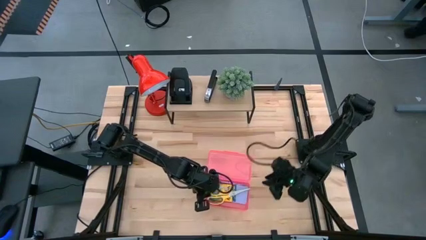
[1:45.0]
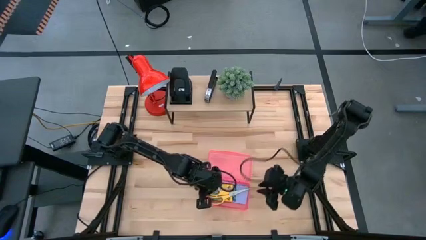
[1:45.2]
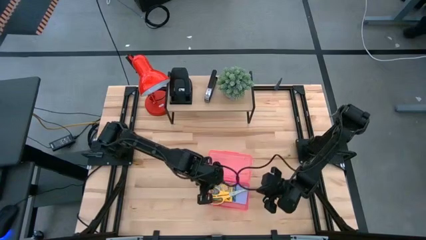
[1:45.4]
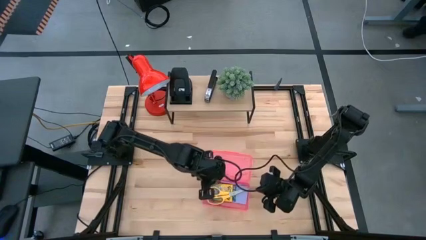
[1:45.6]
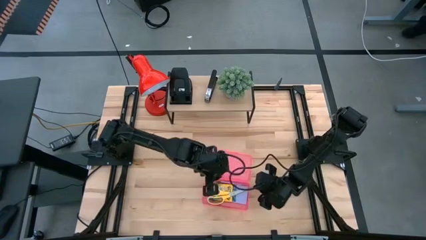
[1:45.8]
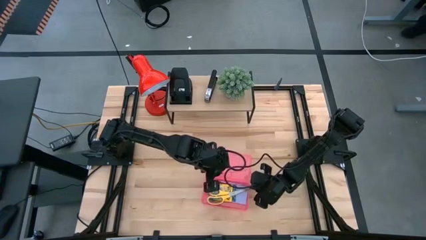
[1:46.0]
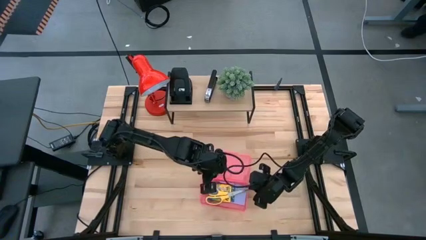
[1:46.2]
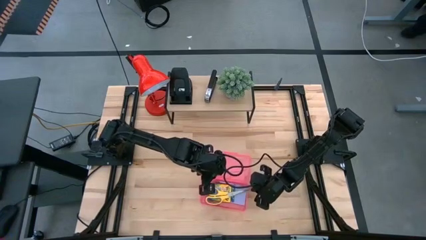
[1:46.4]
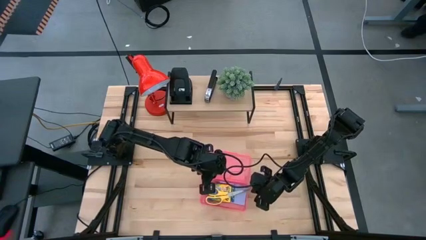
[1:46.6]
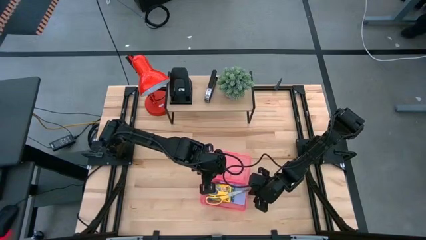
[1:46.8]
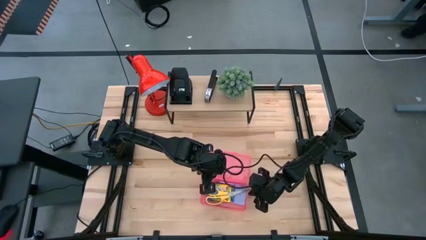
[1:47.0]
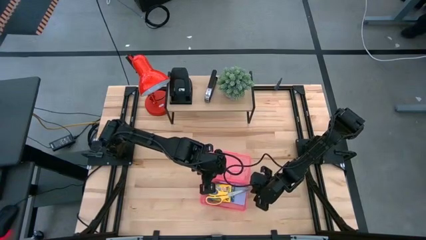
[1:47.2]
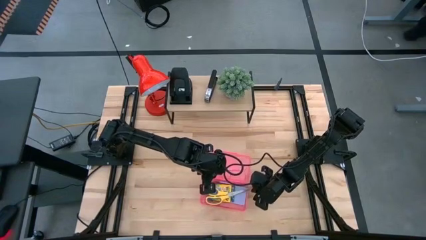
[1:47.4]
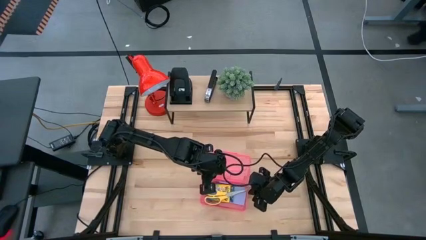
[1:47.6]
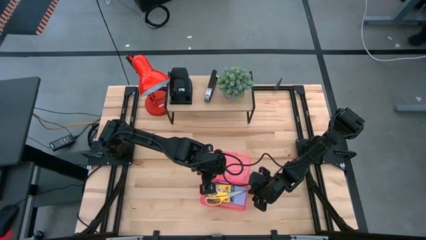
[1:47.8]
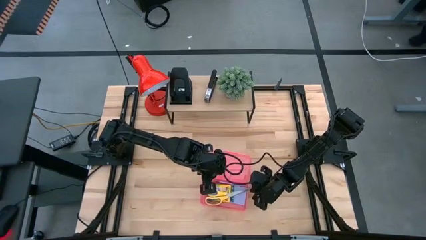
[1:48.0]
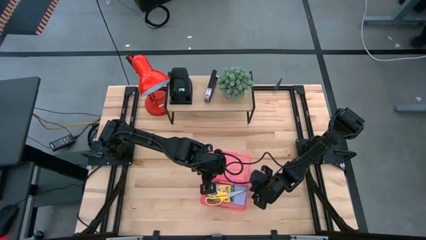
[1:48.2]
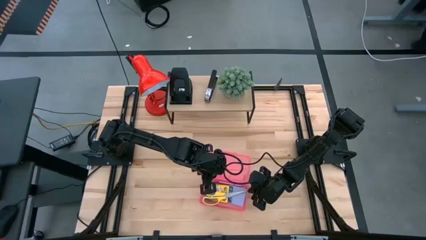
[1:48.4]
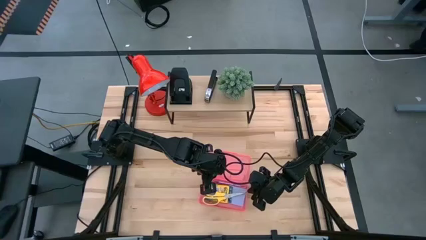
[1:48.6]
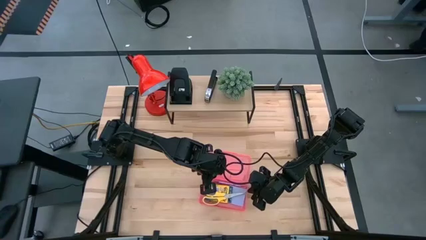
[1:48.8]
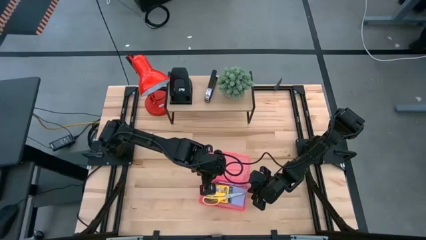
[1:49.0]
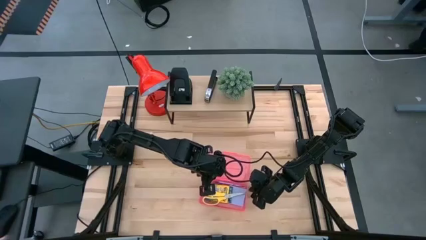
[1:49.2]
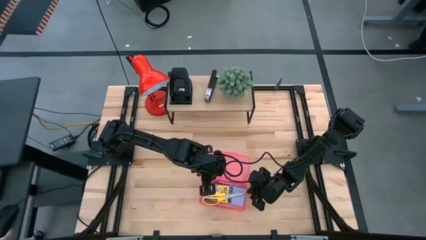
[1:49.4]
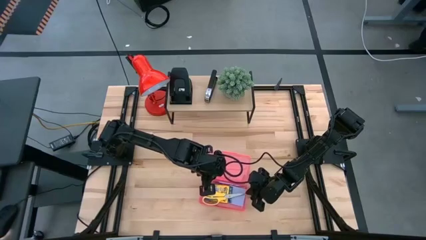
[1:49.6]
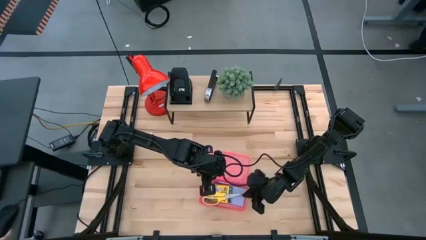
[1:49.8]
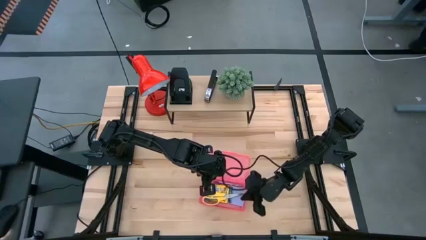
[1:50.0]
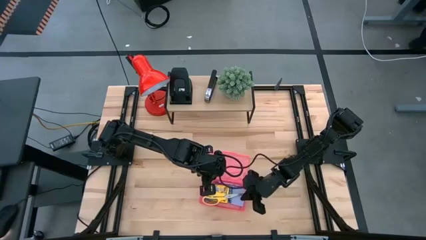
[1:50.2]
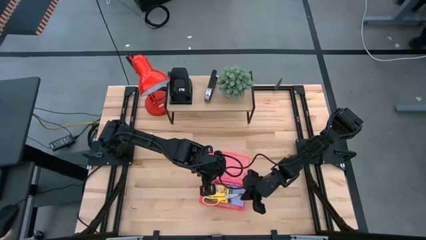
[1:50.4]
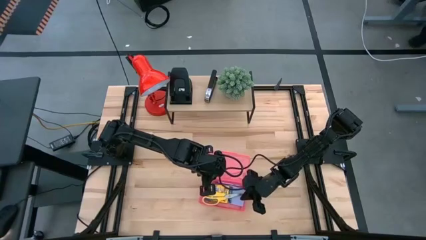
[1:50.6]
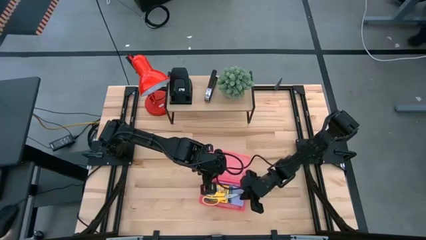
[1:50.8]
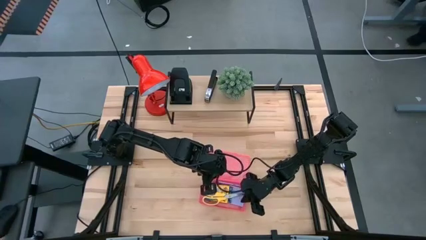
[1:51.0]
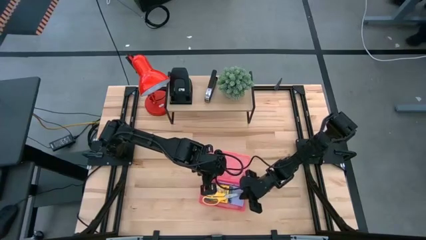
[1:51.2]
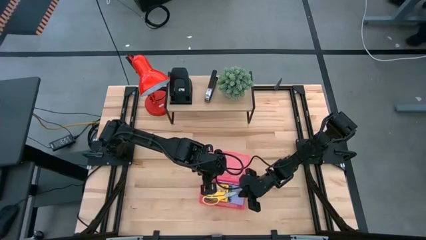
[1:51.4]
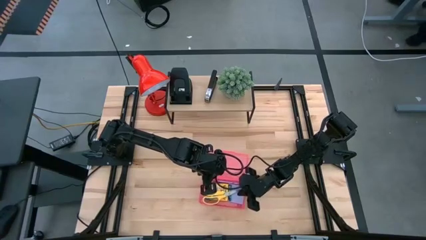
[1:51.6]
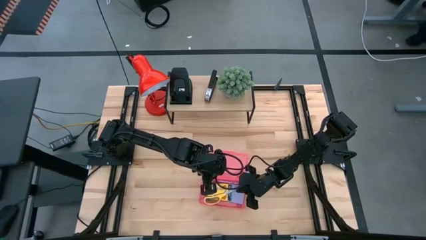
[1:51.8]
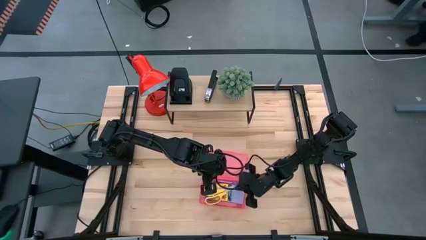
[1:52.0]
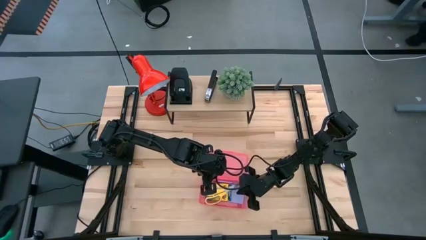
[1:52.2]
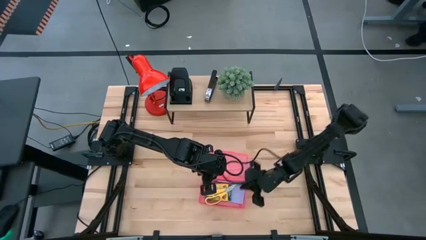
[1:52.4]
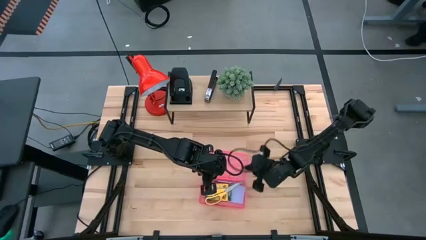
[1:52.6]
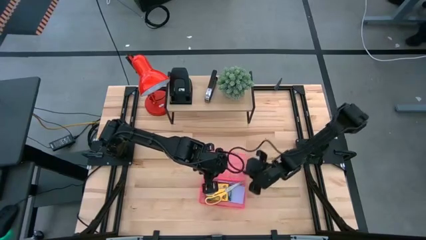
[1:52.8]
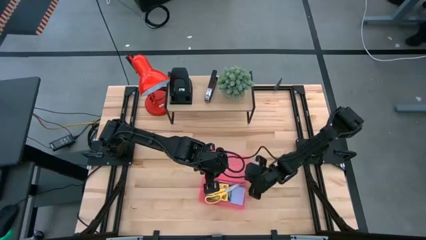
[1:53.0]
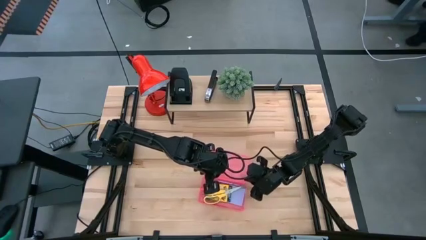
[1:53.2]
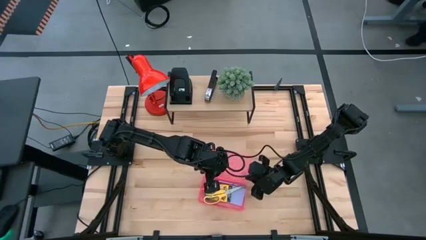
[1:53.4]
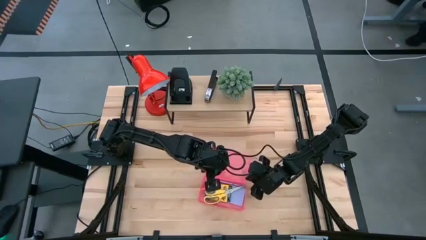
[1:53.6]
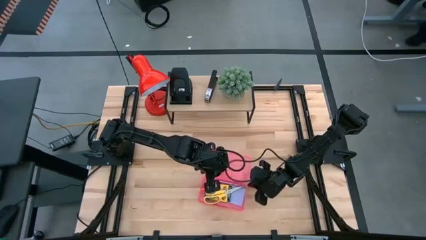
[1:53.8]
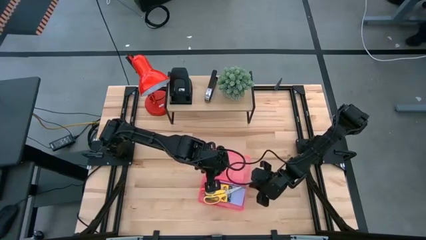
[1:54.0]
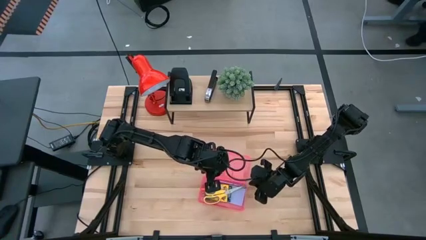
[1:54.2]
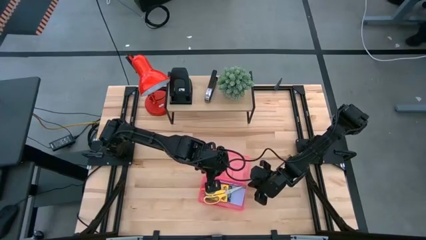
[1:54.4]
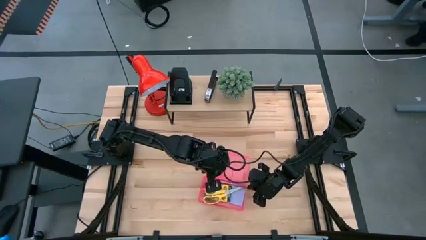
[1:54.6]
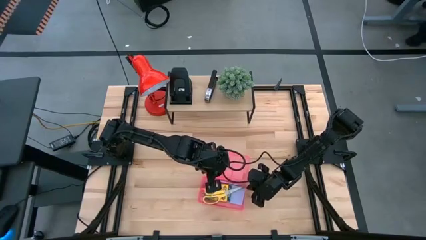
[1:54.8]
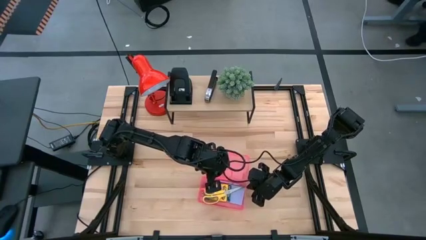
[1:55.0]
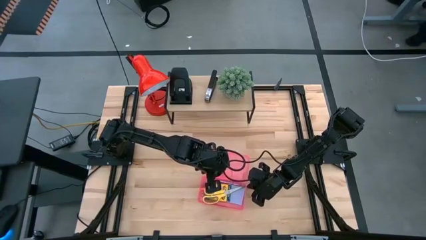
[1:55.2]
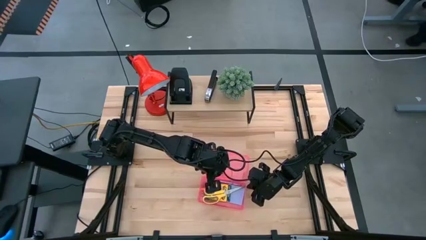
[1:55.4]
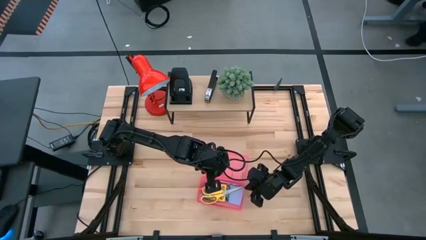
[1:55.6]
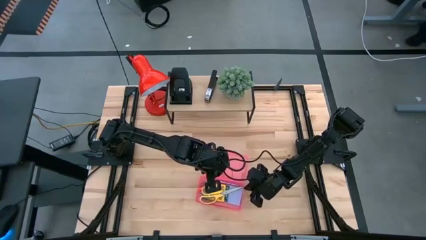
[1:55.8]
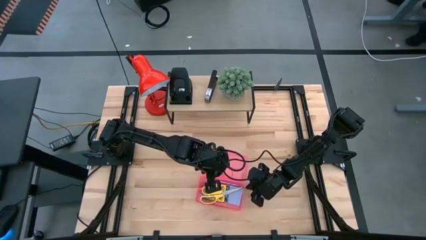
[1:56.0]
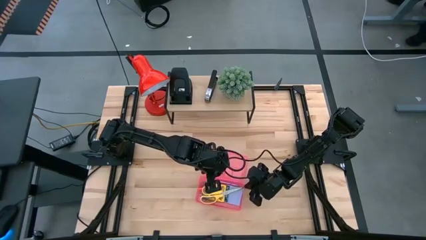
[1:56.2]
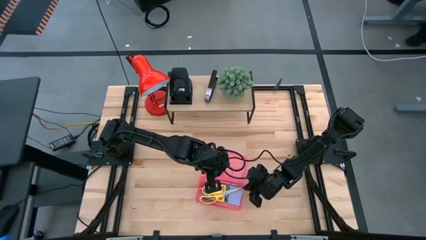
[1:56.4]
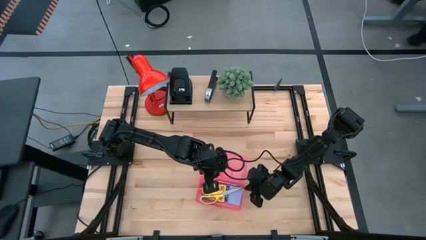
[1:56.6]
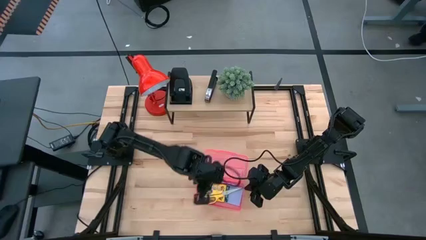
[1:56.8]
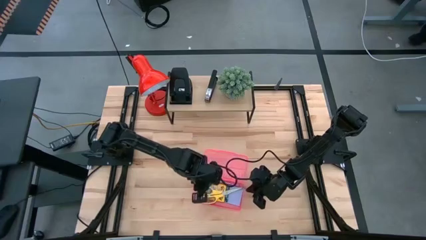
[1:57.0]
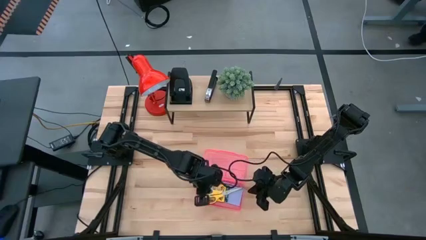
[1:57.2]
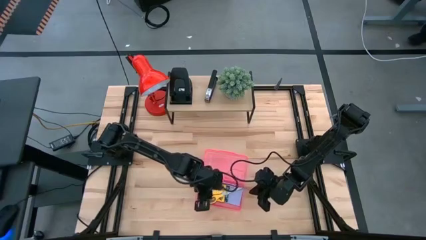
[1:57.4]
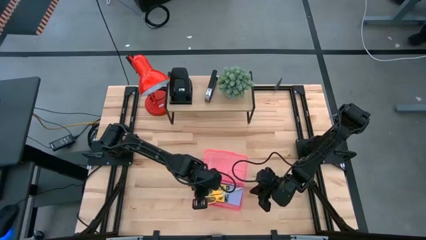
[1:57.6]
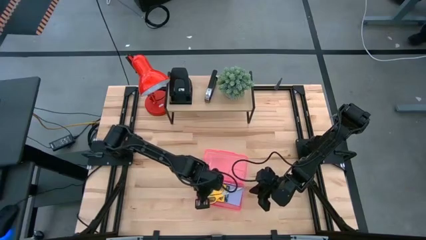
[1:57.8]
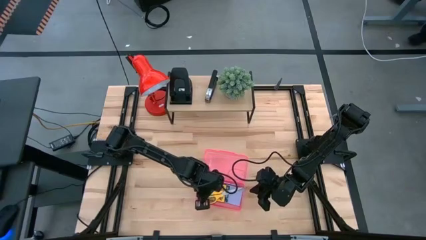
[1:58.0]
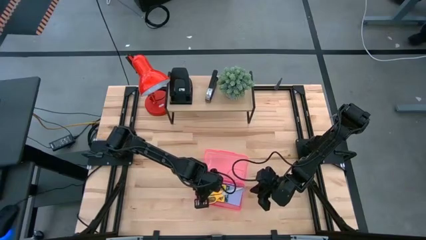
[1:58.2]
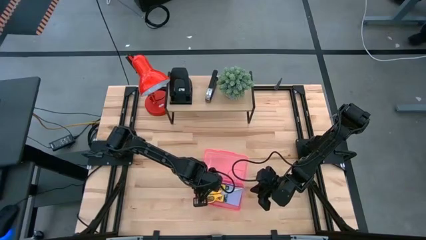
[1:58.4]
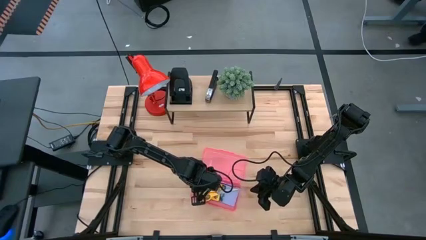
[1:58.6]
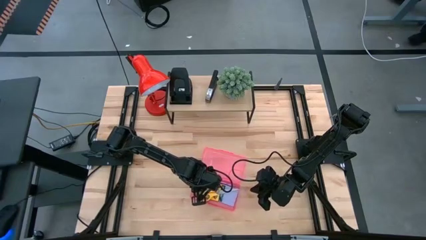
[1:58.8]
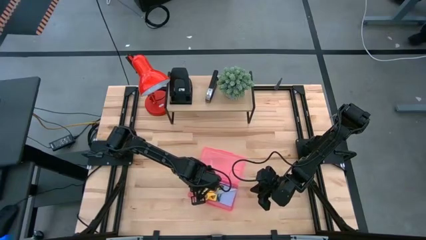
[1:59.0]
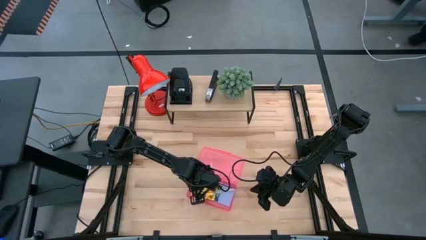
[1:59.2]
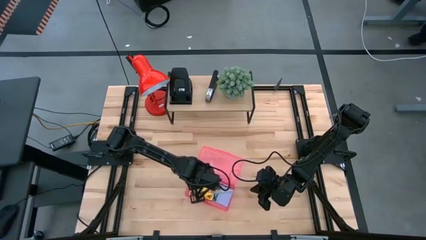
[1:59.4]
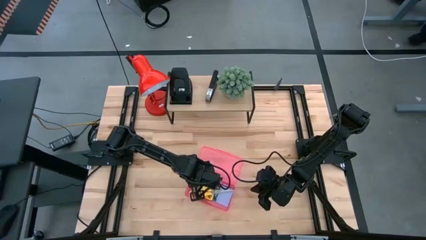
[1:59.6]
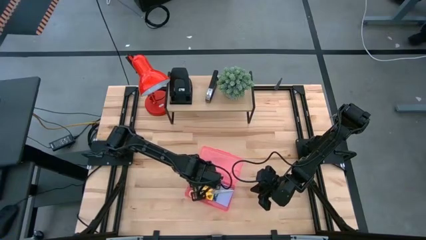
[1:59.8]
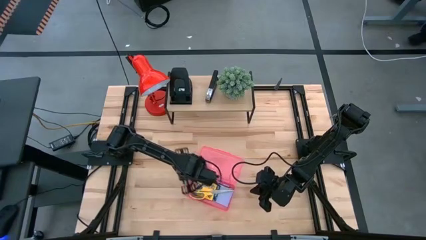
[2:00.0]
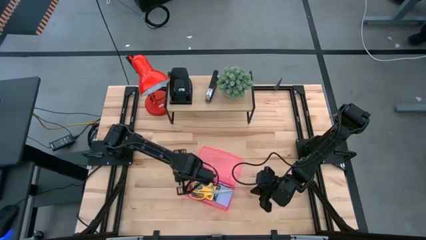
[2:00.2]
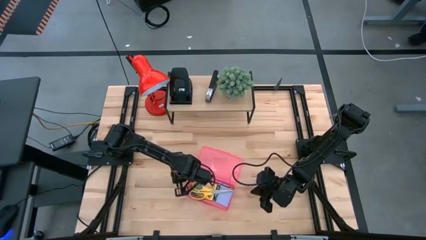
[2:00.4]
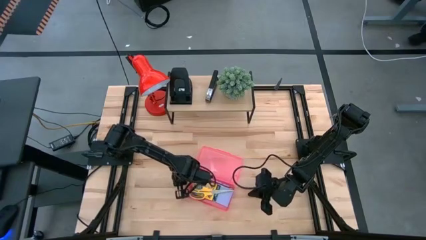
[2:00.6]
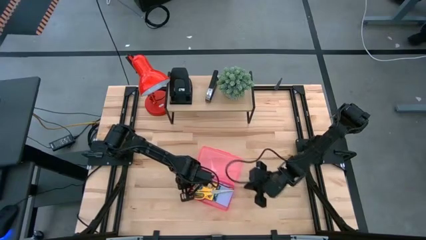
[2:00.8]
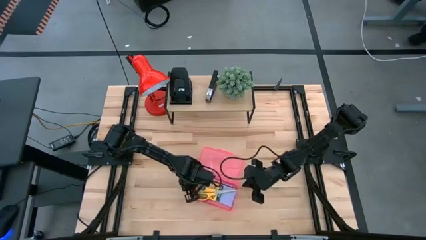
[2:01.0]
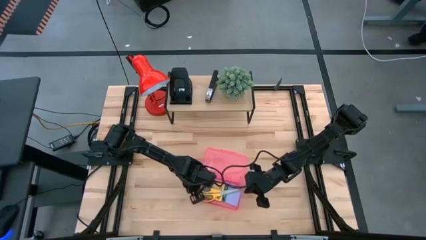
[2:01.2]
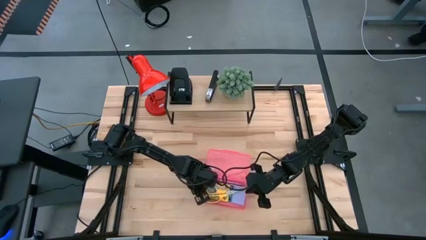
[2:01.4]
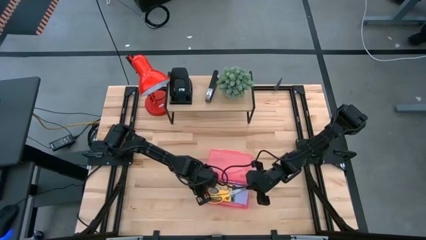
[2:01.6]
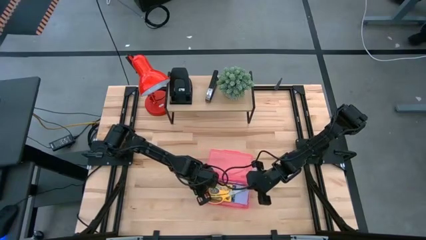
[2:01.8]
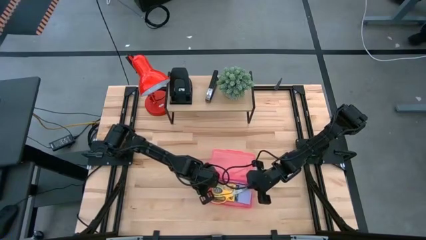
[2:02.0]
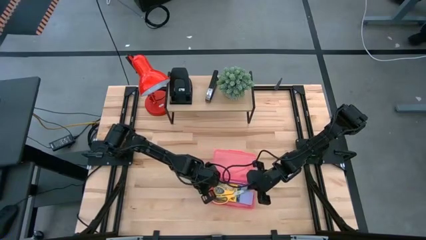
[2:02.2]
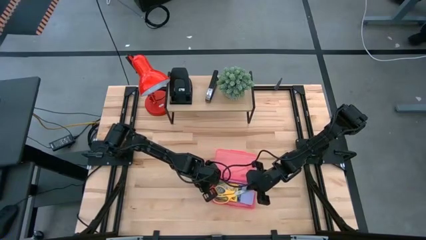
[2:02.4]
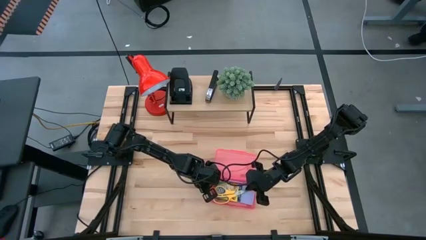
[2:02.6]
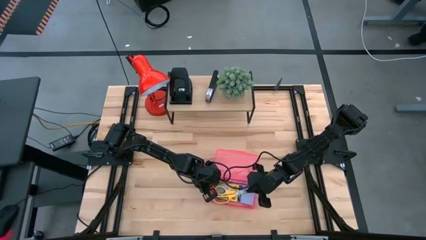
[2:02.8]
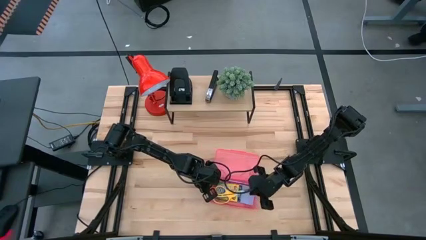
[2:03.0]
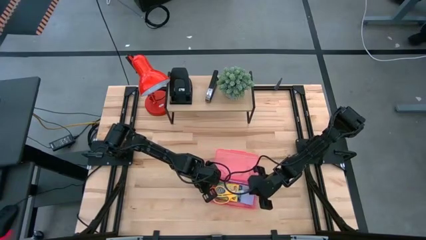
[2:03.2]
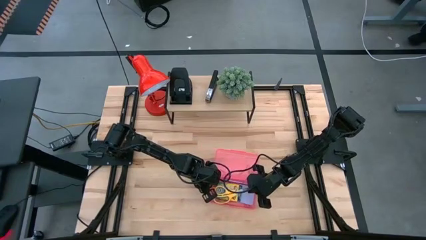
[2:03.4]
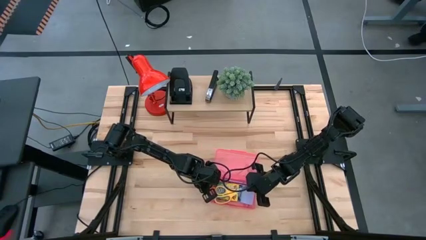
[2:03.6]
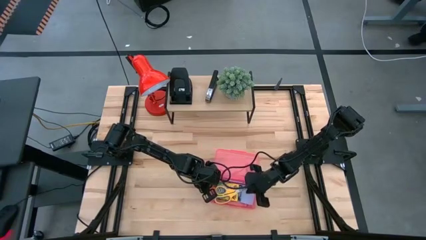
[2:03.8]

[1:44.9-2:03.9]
Task: Pack school essentials
Put the yellow scissors into the pink supply box
